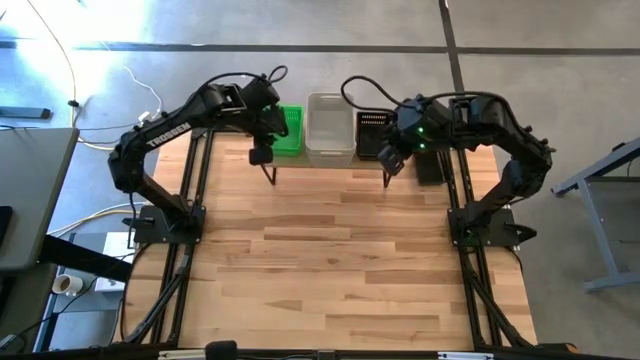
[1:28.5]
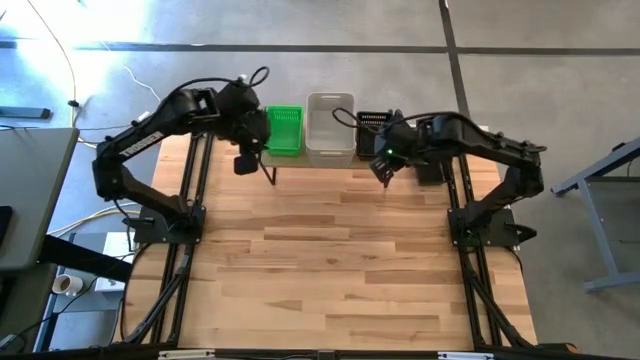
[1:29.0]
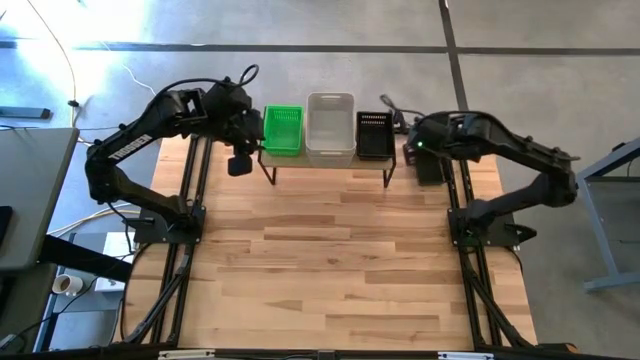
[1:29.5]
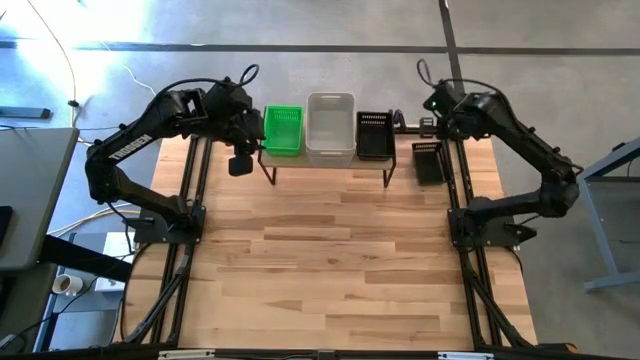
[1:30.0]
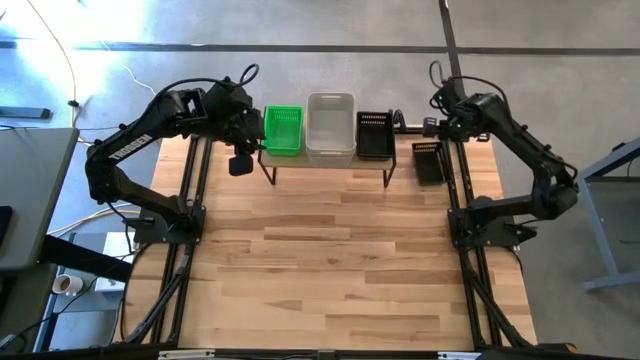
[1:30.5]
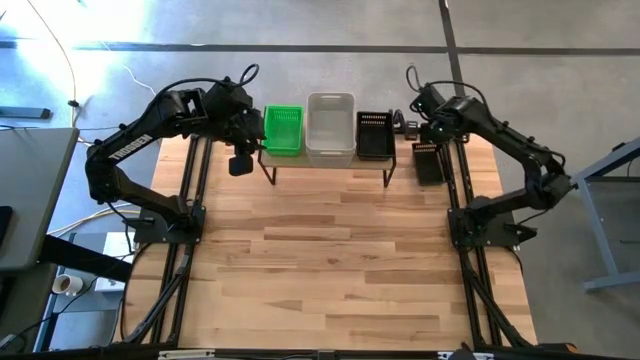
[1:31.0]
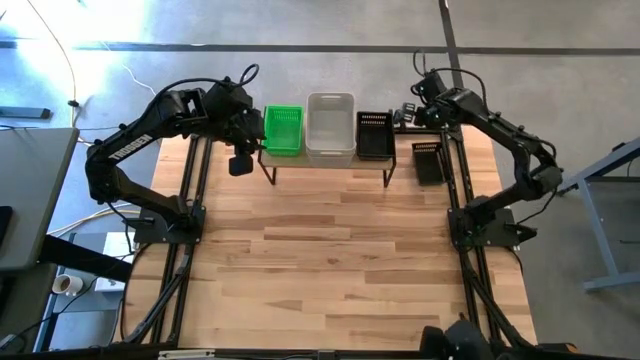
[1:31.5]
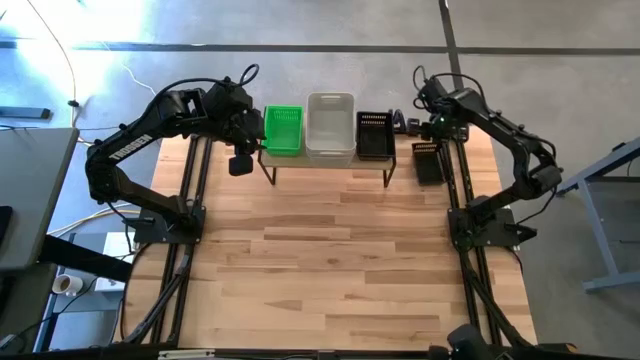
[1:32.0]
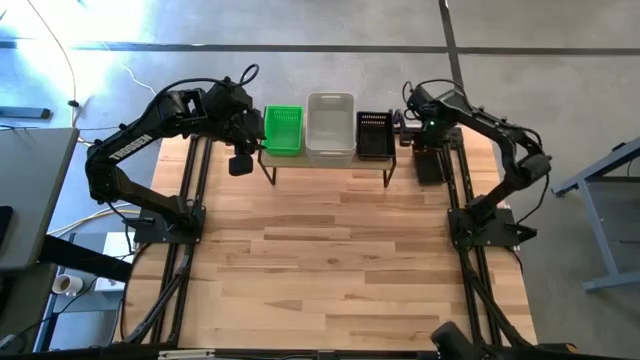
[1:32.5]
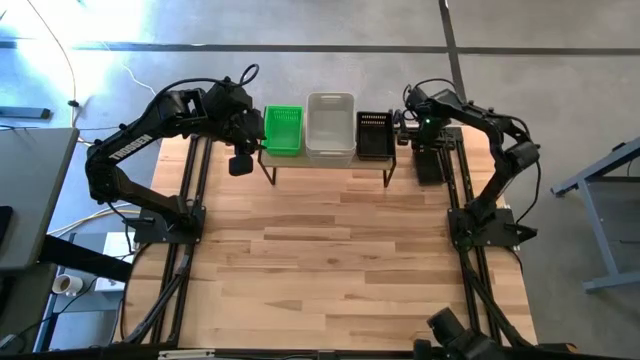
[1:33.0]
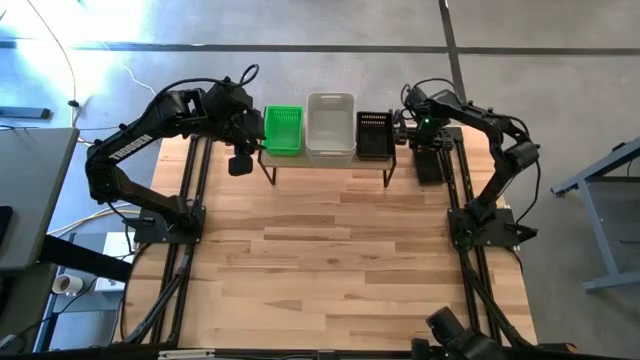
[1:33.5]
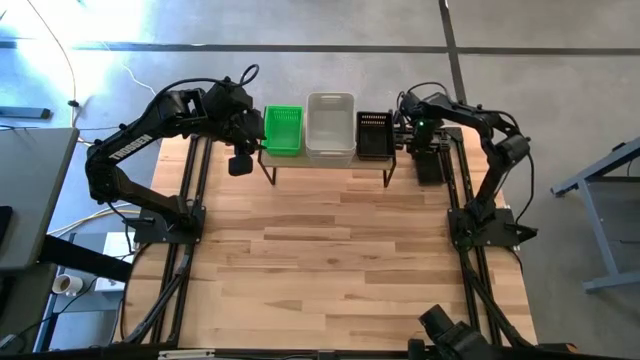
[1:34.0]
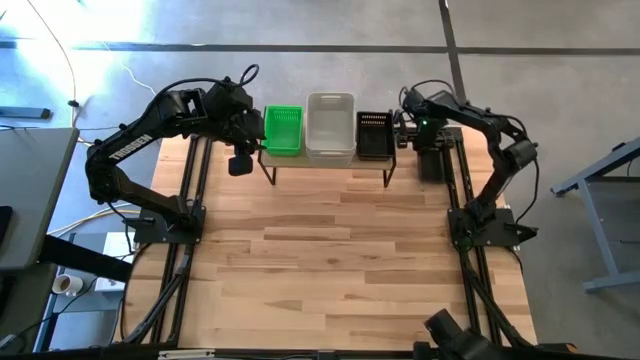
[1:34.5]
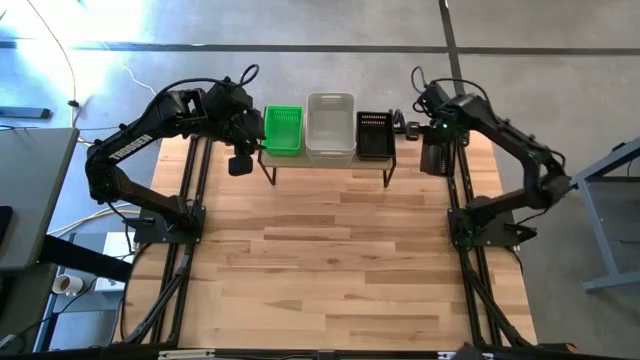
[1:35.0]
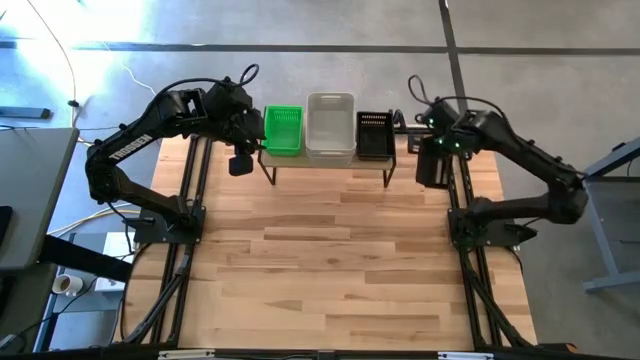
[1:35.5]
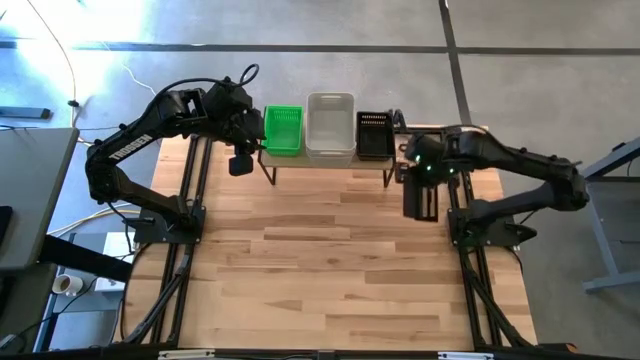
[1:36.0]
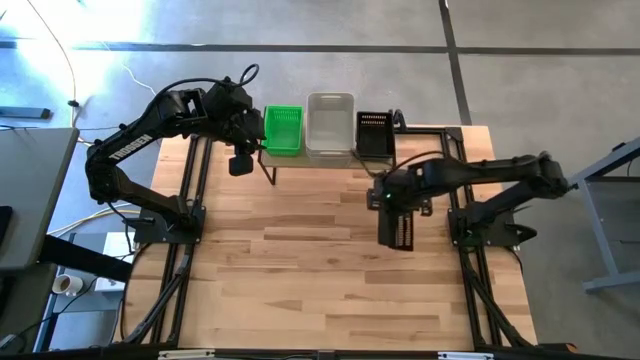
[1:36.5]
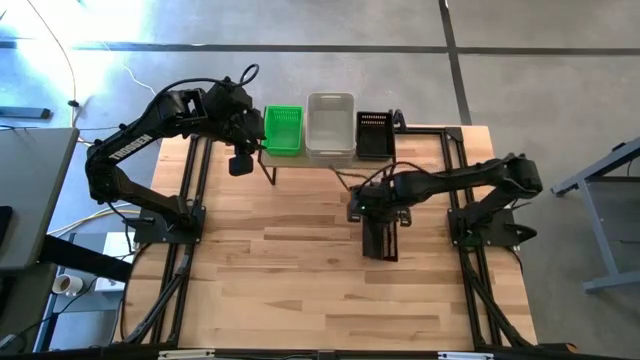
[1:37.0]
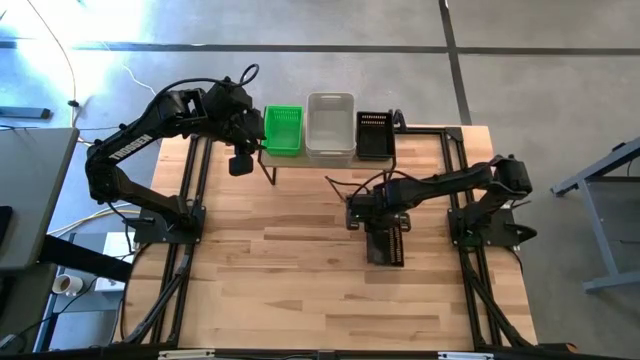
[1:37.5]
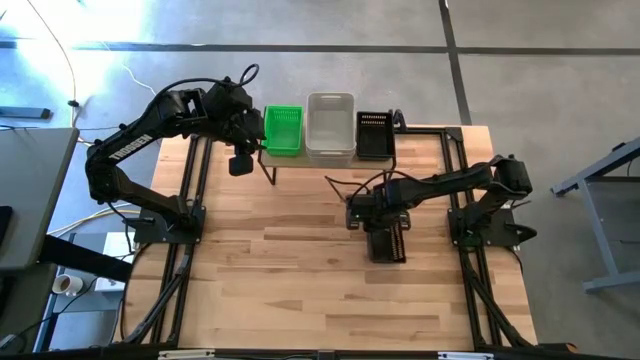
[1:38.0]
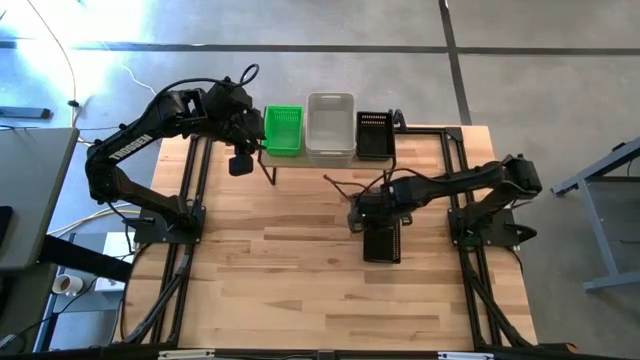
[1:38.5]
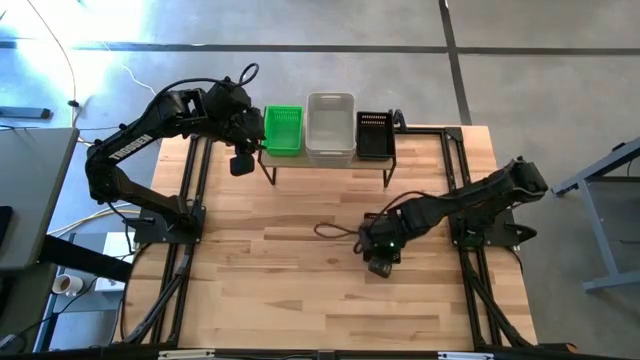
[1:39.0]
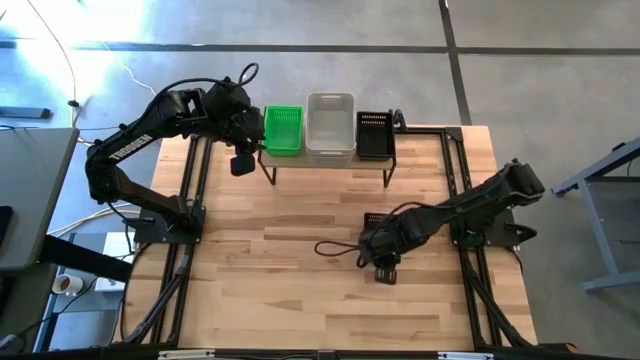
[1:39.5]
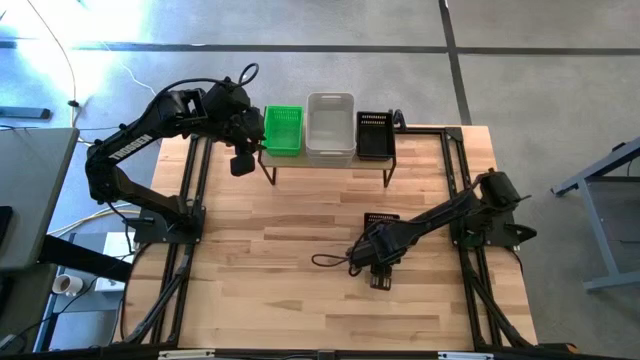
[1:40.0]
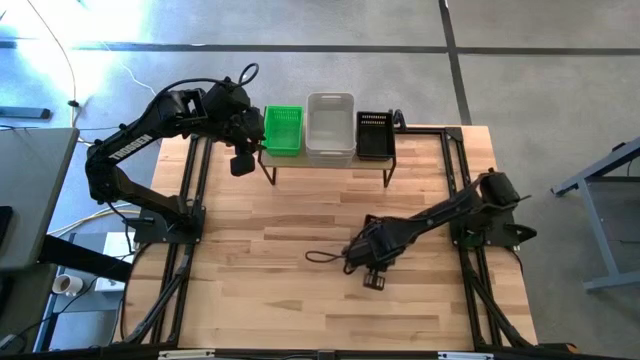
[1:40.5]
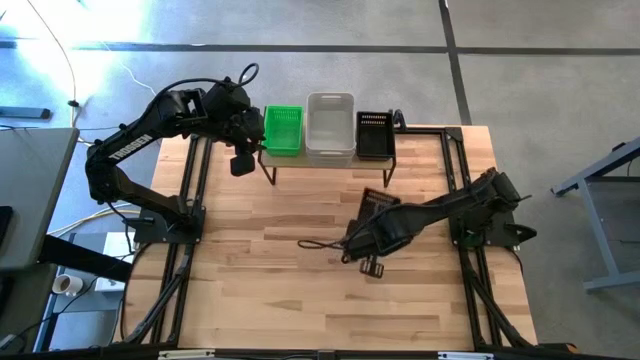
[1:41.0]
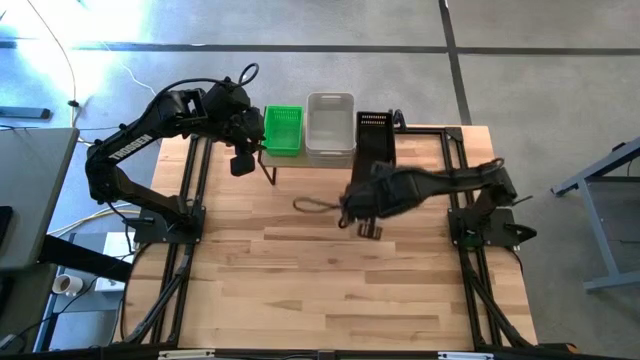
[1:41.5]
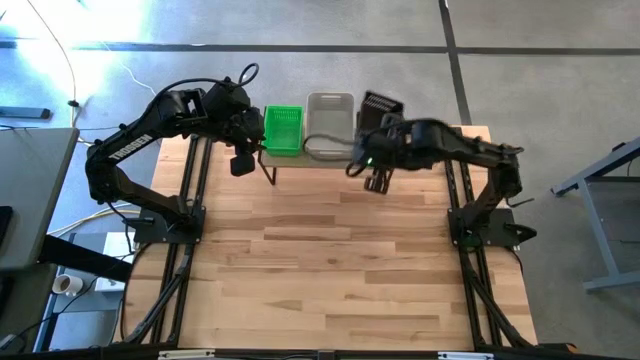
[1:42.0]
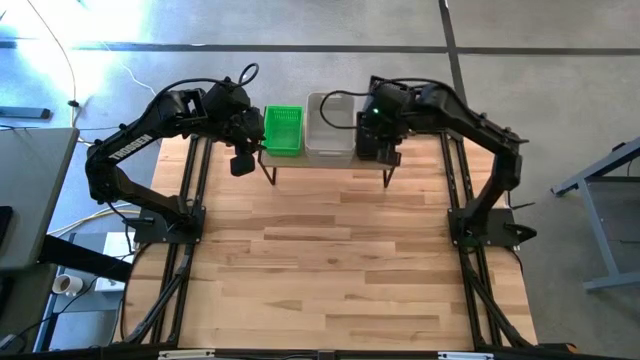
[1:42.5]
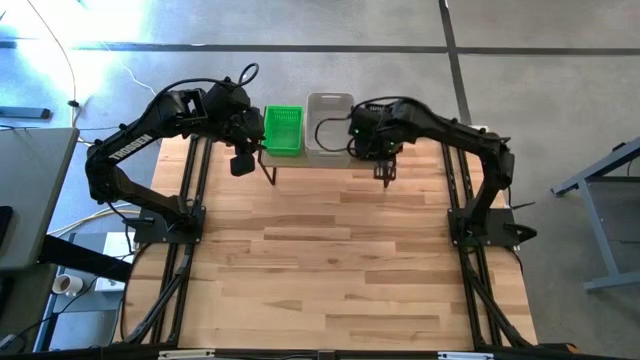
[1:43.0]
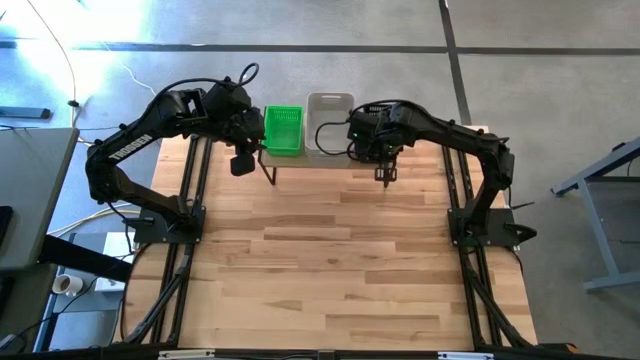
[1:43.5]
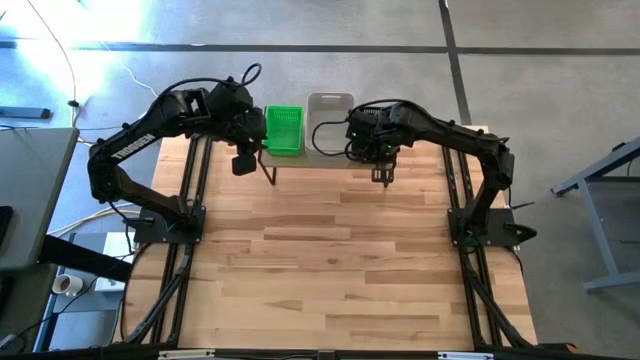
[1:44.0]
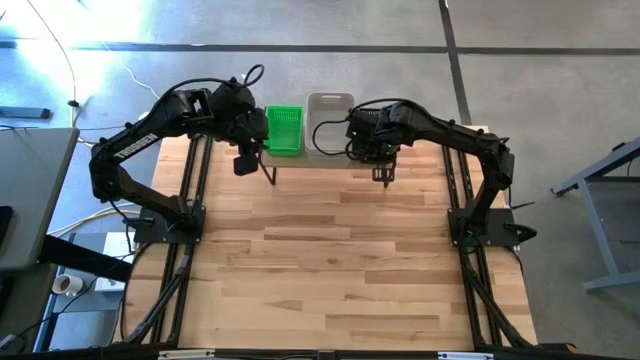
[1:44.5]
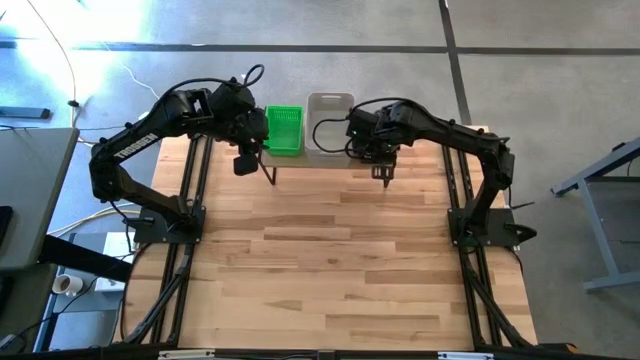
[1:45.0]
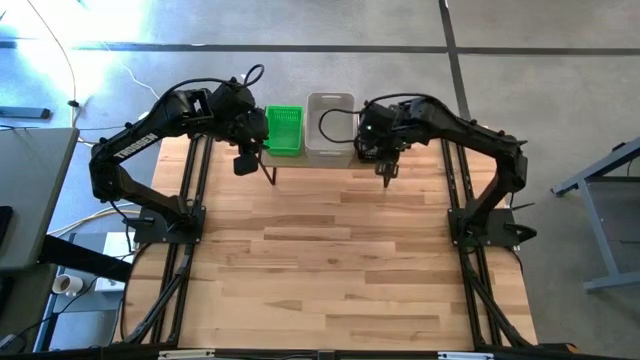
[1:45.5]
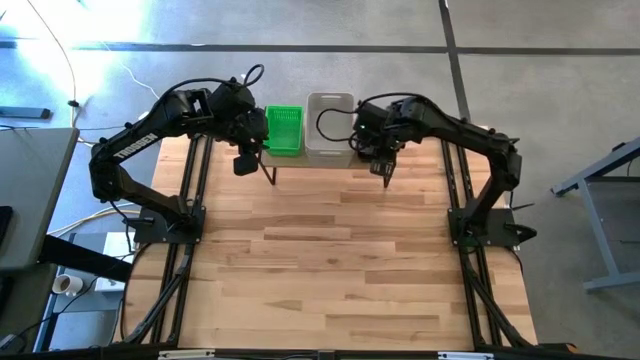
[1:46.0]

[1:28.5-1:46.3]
Task: Stack baskets on shelf by color
Stack the black bin on the black bin on the shelf

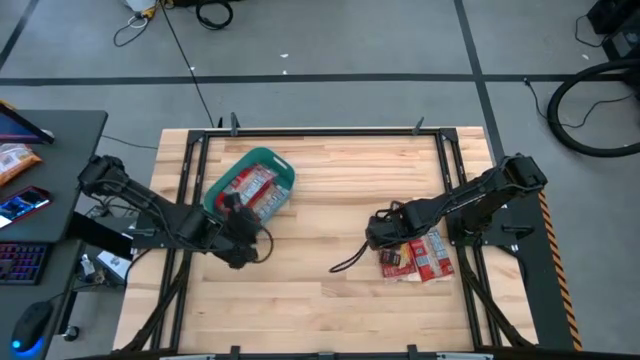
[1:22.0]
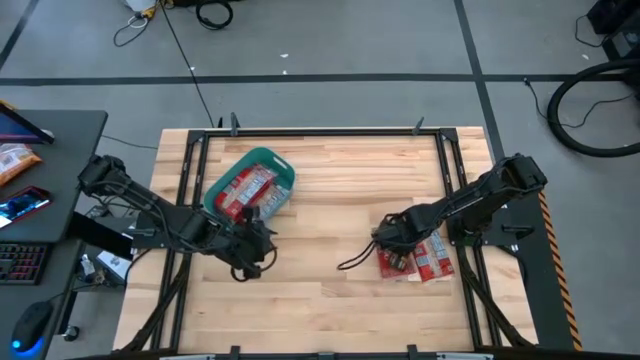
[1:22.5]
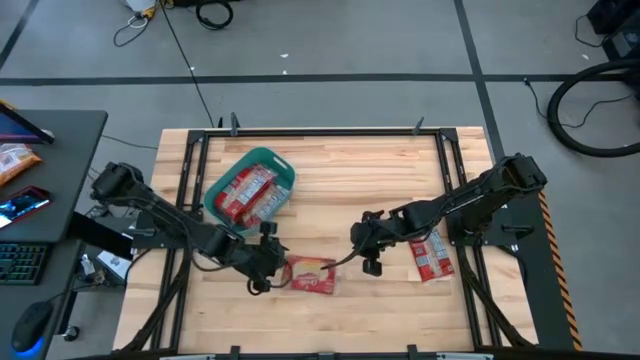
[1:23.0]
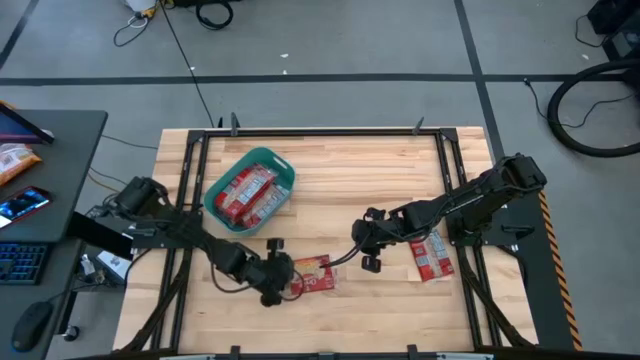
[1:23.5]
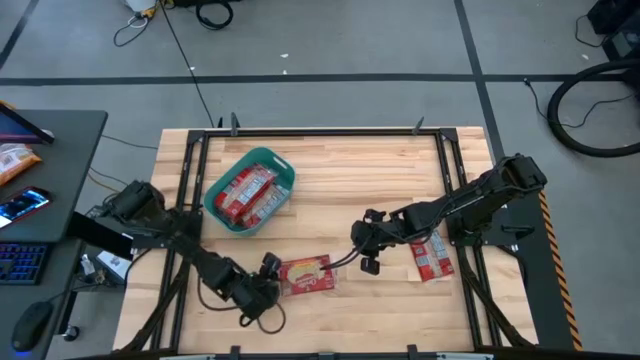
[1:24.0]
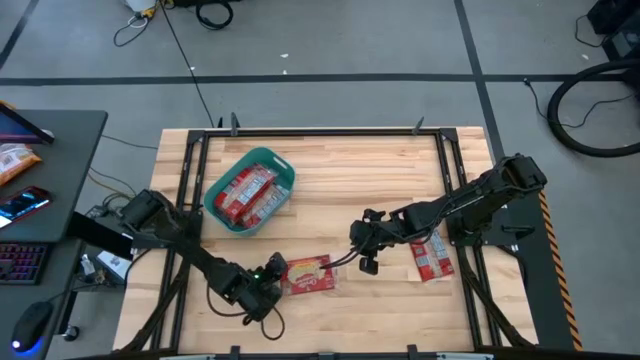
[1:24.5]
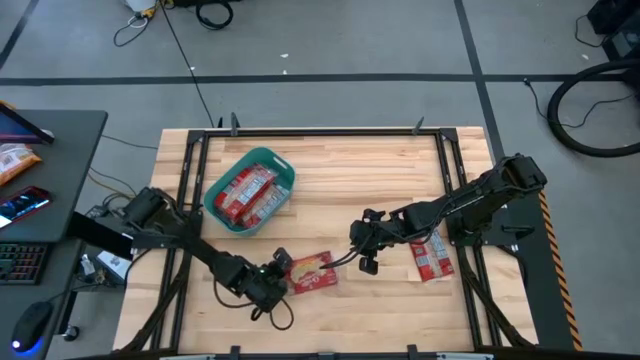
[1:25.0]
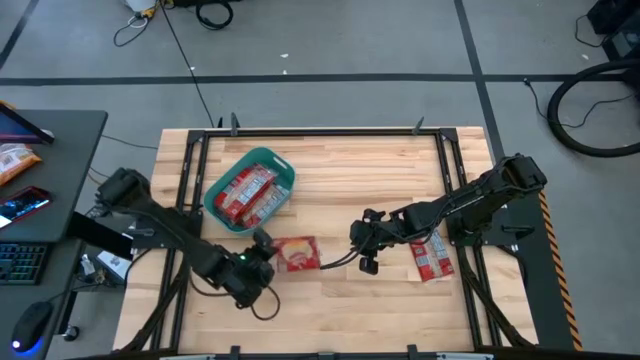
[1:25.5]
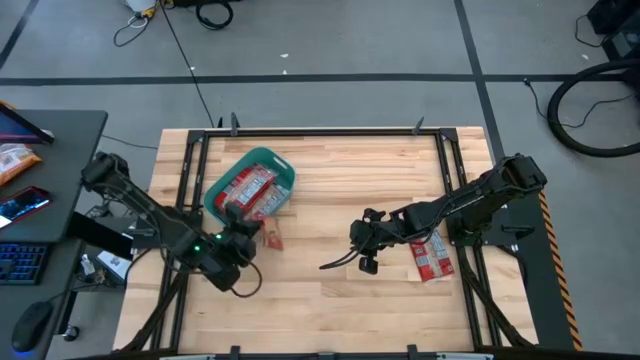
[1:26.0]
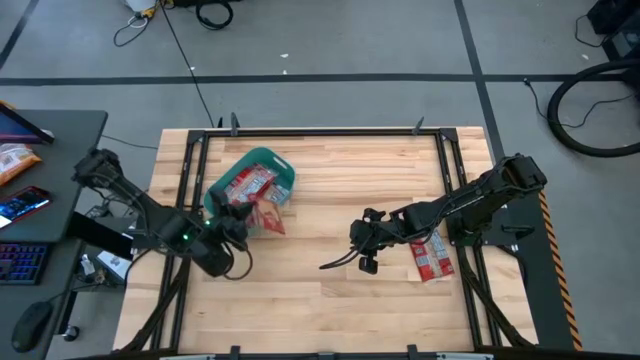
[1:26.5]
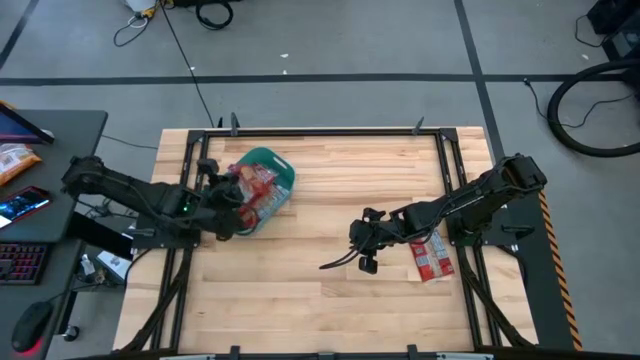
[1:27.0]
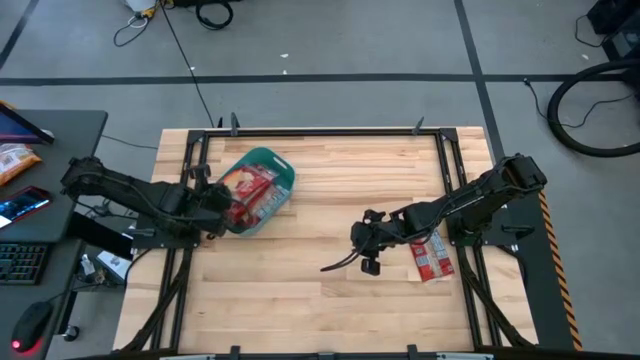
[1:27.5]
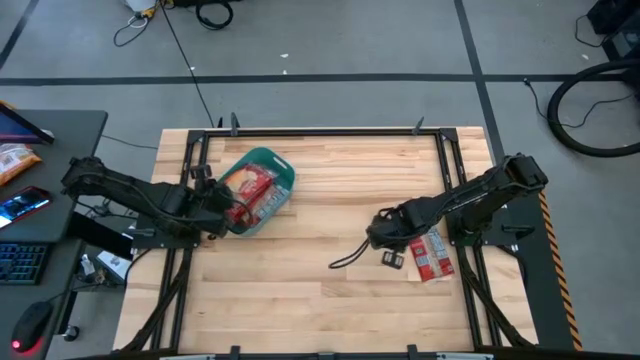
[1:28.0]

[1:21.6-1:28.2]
Task: Sort popcorn bags into baskets
Put the left red popcorn bag into the green bin
